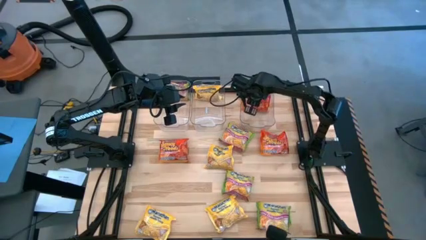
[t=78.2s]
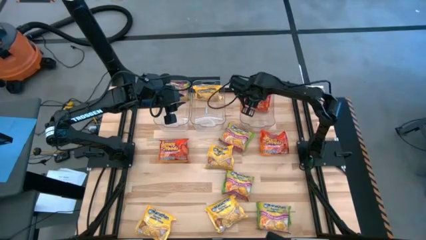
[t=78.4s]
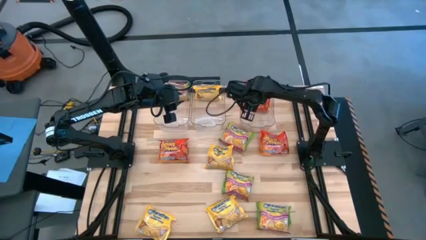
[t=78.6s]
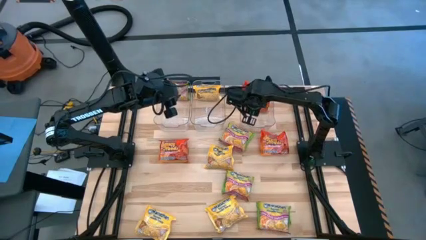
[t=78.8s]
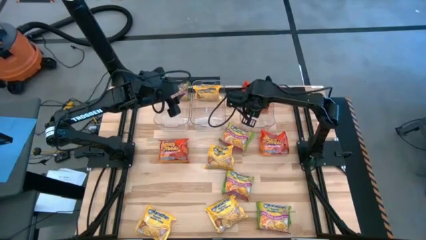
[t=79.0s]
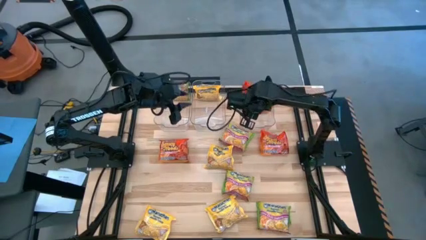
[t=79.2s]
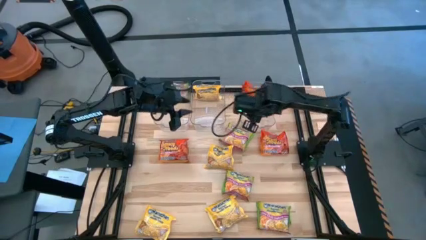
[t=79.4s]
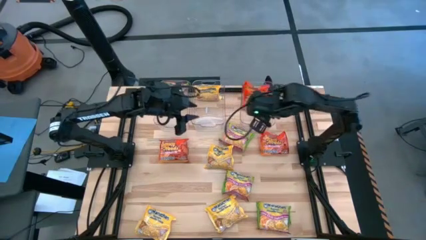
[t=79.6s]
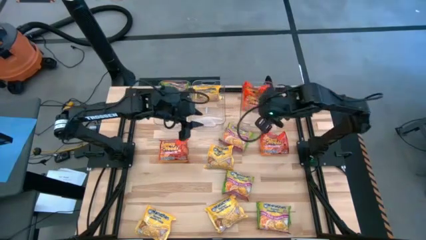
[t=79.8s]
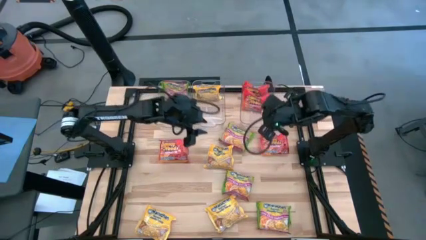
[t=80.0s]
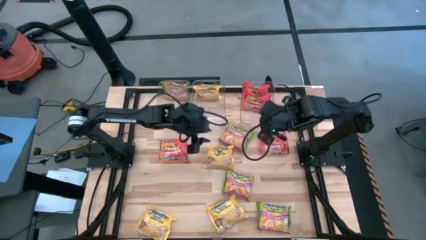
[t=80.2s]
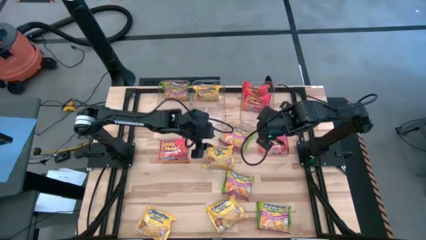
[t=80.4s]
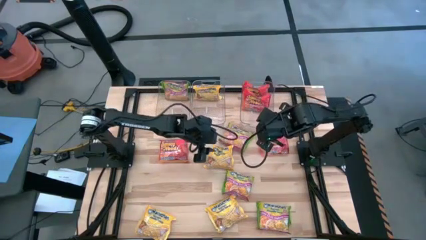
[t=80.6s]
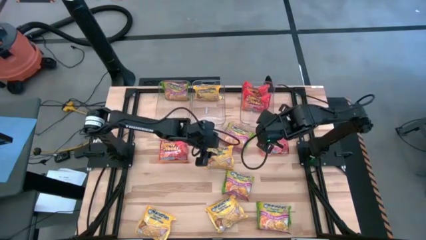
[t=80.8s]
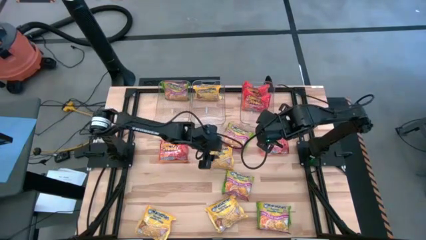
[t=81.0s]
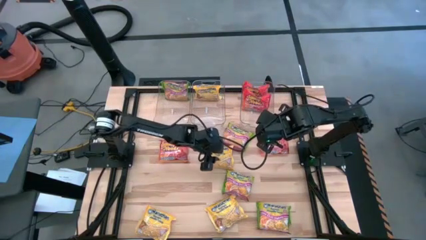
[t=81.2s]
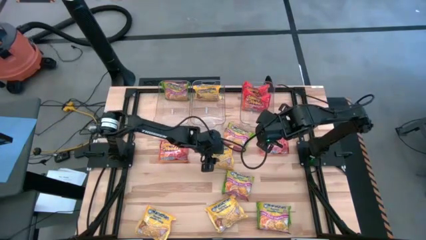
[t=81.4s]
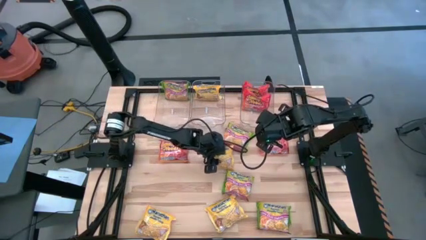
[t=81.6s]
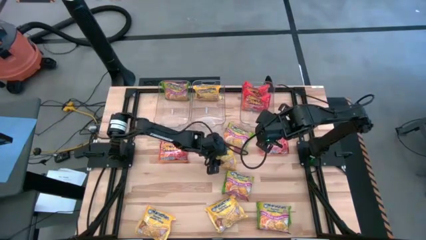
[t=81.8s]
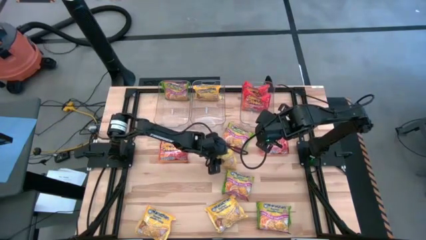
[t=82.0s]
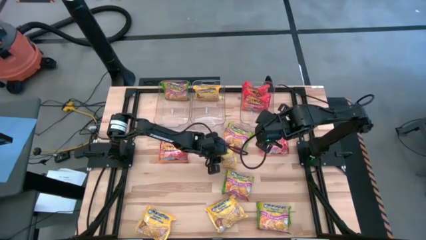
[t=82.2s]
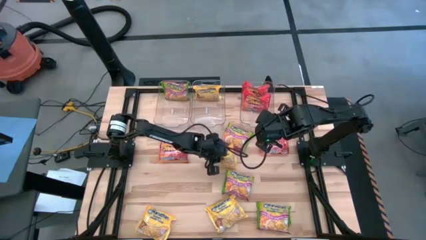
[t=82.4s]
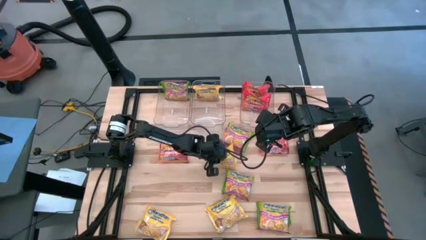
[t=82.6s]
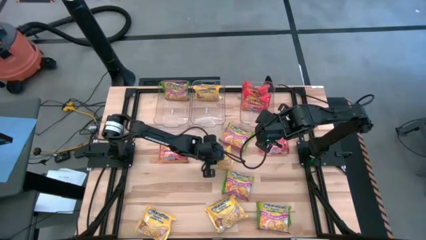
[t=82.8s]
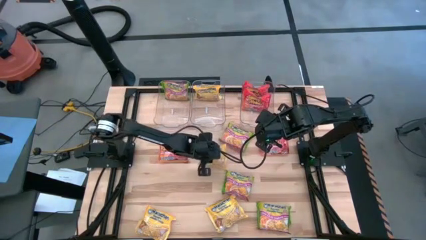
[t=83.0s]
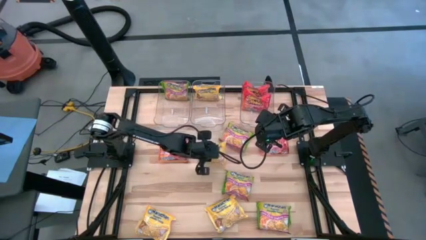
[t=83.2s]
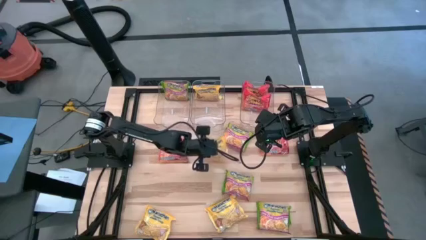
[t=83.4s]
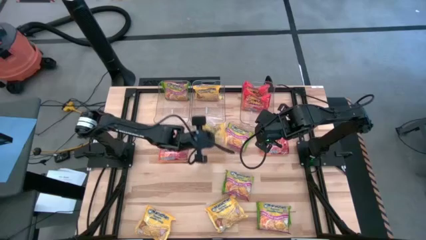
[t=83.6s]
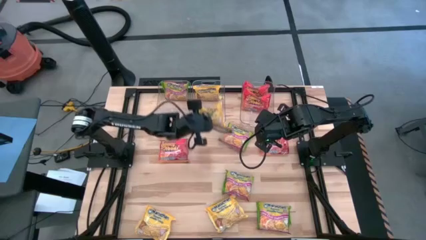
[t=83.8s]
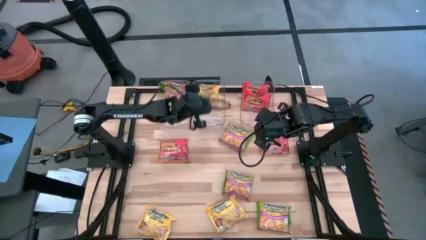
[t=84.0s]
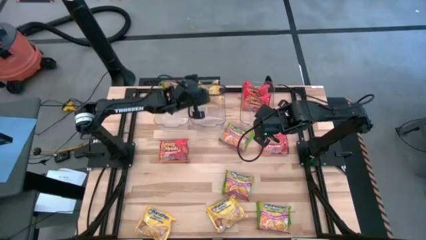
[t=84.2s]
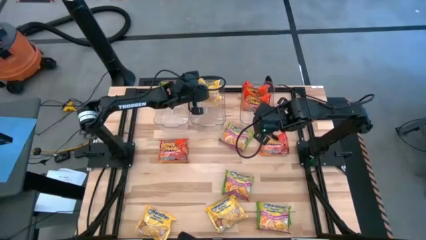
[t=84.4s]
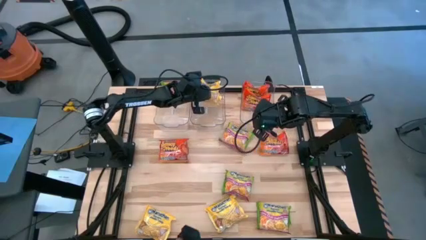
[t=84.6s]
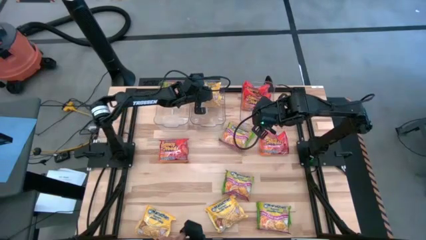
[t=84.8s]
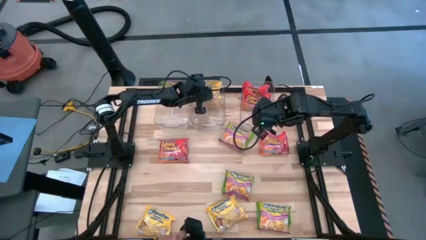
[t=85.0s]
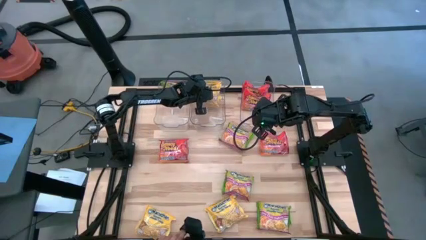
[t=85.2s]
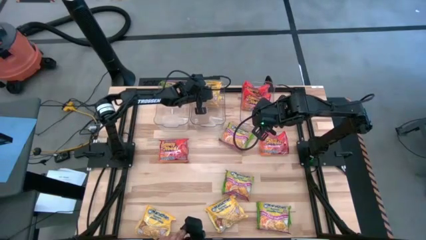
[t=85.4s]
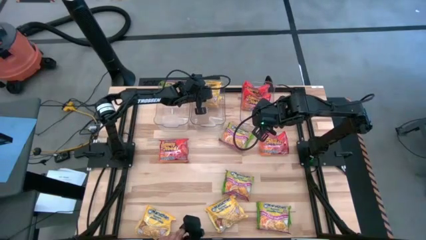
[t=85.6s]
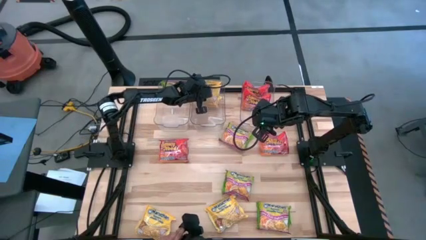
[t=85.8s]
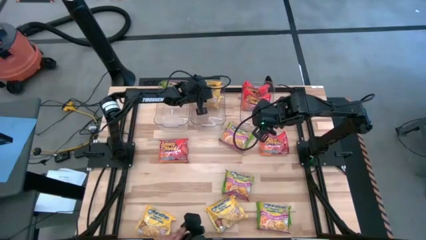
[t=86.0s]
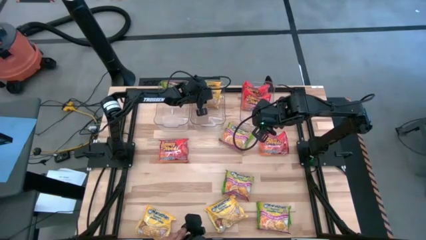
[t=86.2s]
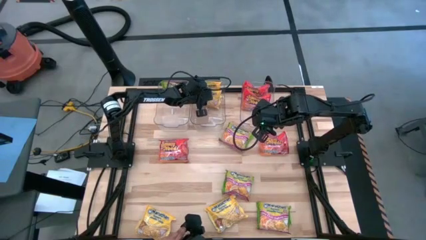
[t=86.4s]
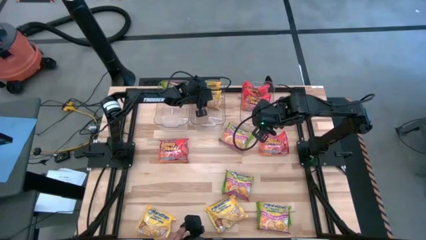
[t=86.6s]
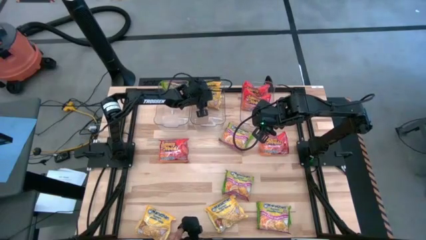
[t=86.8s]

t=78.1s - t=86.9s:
Task: Sort Maruchan noodles
Put the yellow noodle pack into the middle transparent bin

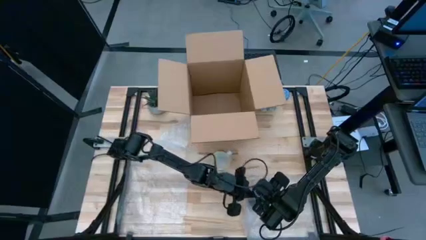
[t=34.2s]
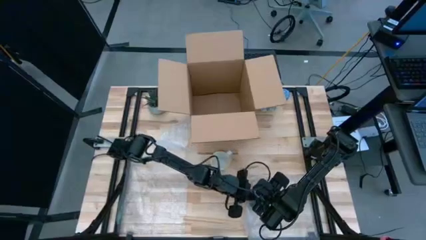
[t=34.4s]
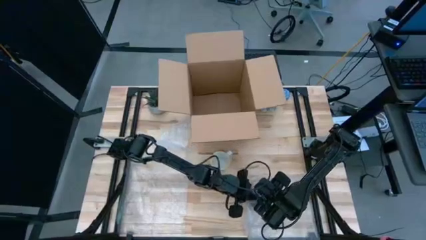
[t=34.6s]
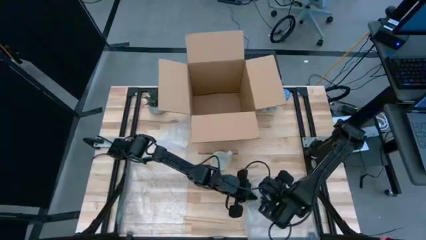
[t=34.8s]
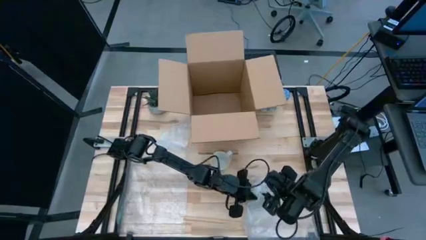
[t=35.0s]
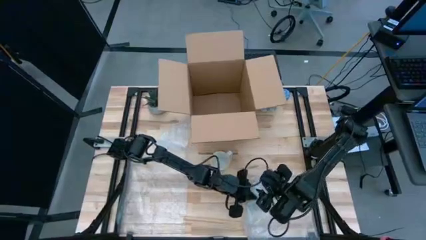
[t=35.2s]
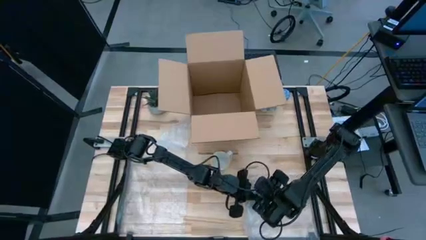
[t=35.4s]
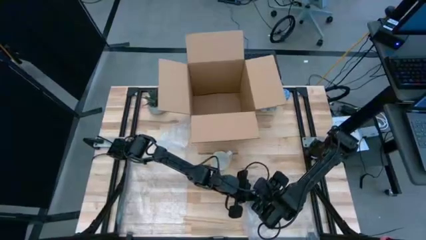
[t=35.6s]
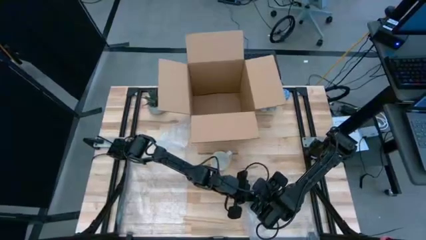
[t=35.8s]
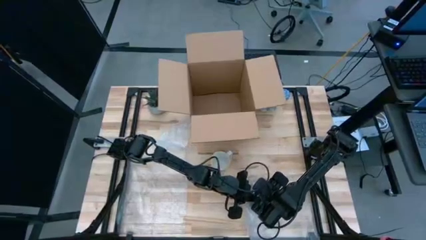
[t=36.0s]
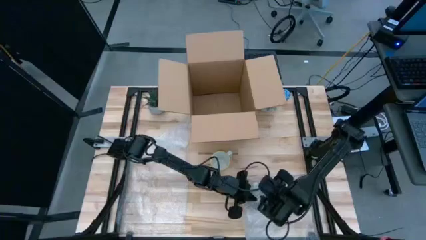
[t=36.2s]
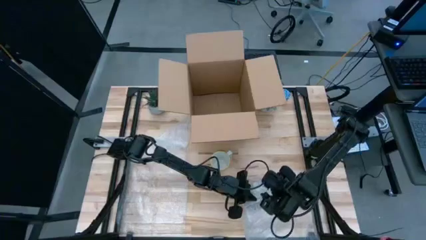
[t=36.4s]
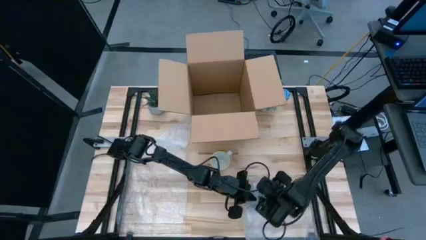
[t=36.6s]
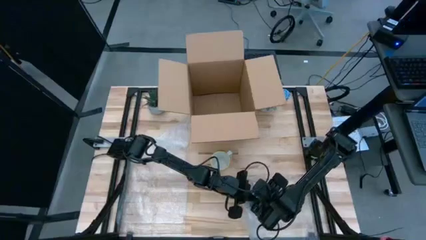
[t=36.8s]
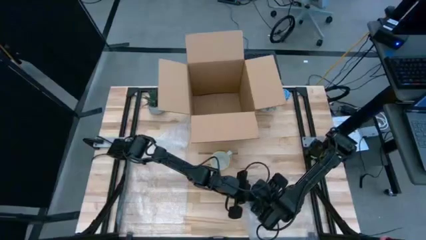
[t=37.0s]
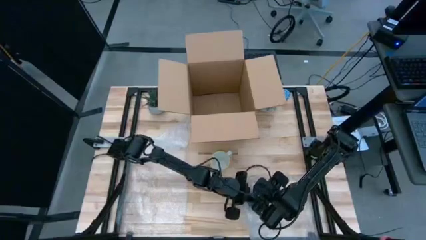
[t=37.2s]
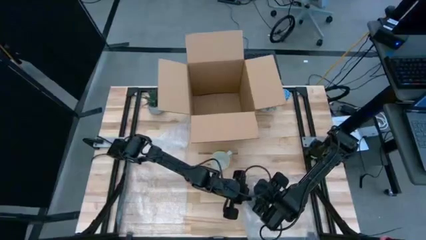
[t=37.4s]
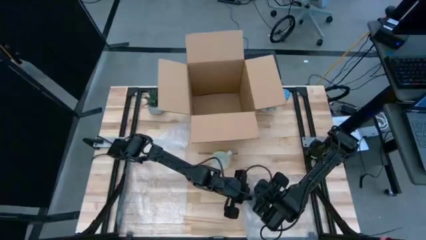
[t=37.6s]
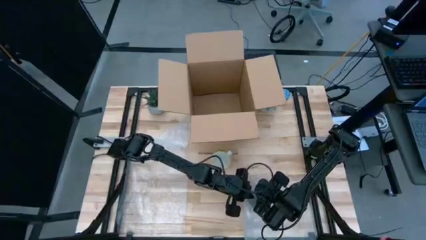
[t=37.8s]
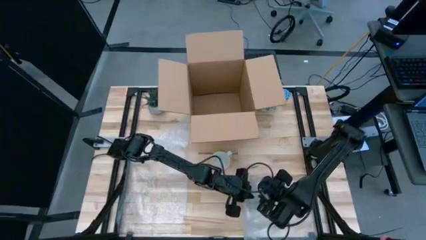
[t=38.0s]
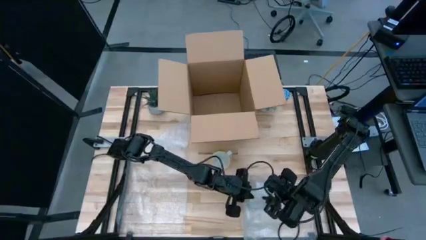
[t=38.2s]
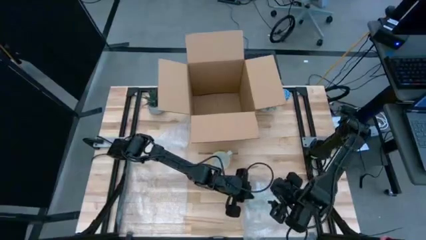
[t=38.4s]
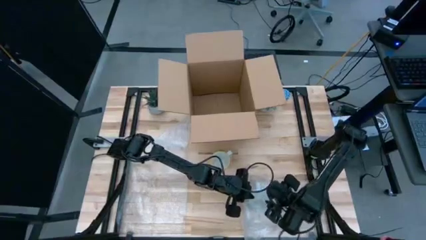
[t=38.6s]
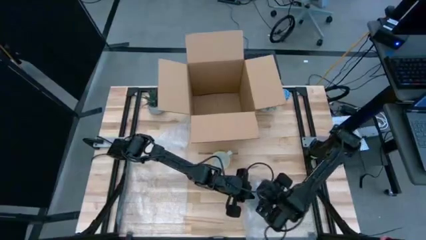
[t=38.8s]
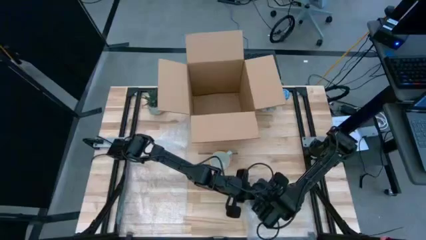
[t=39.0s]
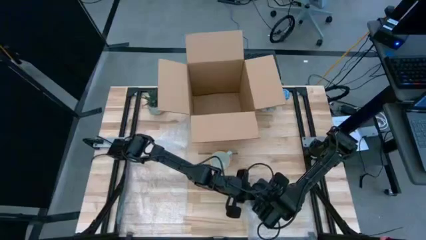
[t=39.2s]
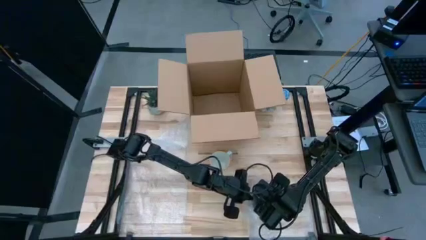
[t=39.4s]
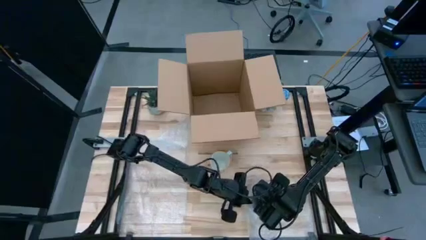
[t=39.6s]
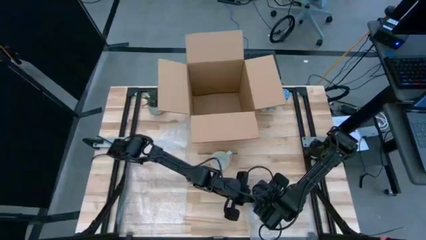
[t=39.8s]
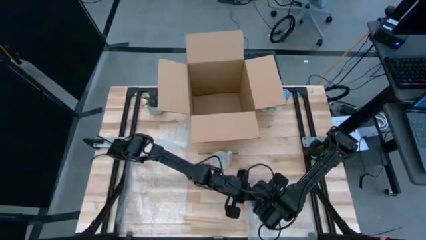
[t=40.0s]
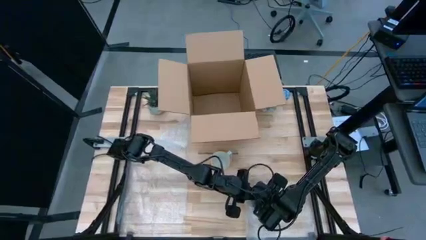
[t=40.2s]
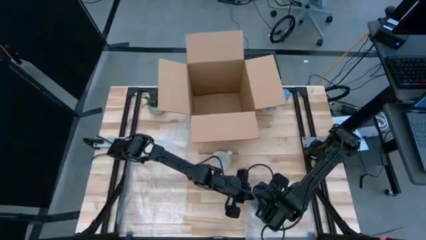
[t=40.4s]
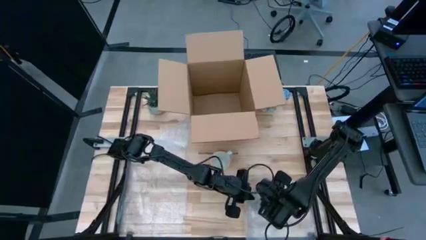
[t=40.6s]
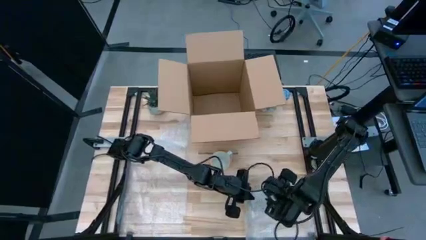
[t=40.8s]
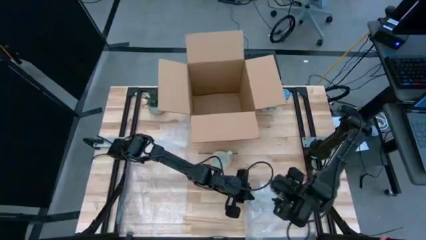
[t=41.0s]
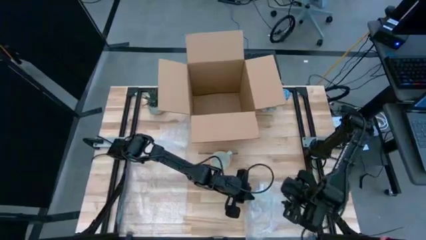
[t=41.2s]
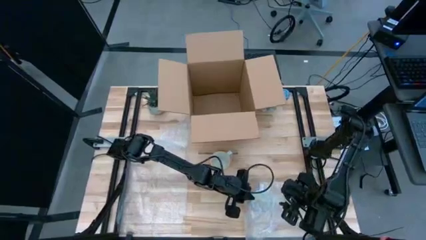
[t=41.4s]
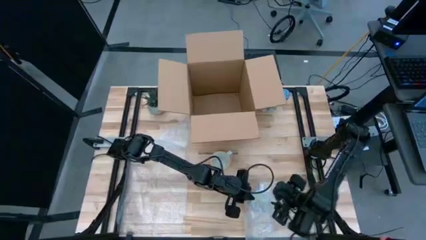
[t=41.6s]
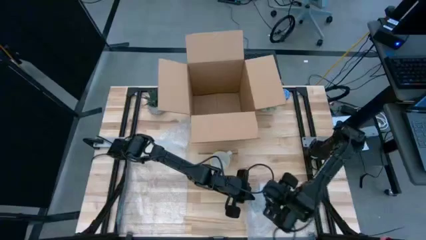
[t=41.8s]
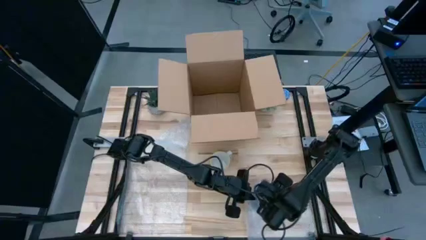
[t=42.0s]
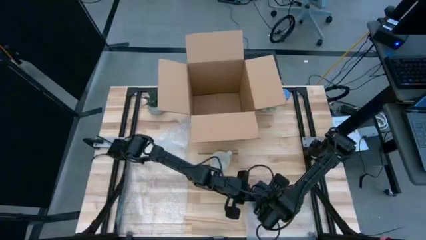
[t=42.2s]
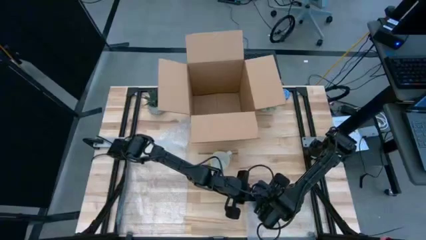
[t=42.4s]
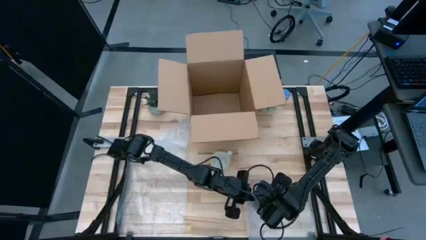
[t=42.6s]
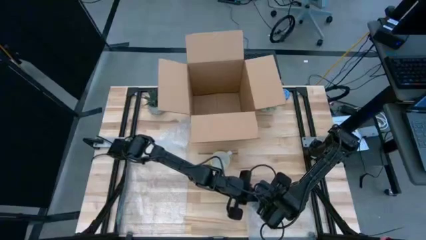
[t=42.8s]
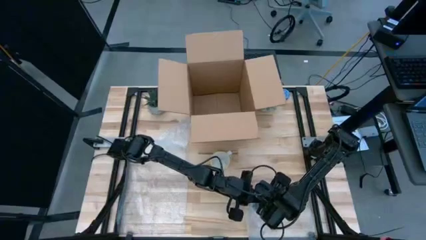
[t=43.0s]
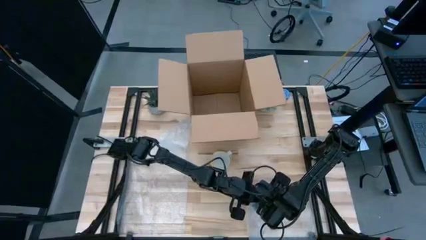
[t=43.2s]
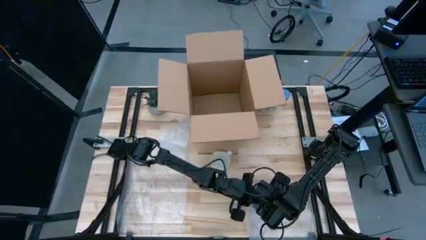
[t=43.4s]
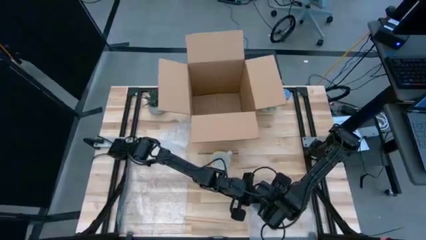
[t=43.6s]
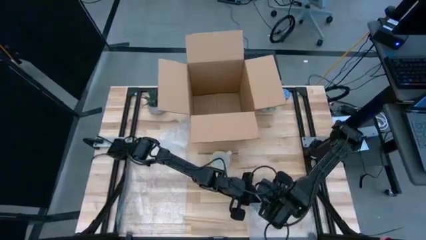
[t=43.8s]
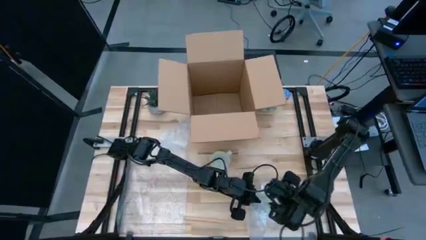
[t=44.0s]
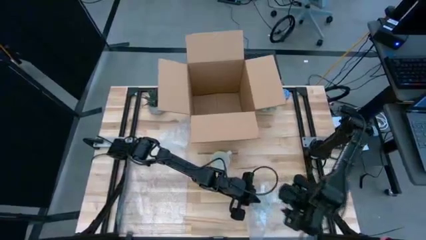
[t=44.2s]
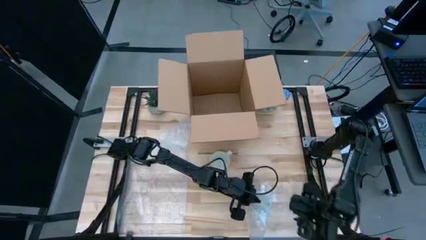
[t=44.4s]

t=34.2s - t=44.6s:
Task: wrap mug
Wrap the red mug with bubble wrap
